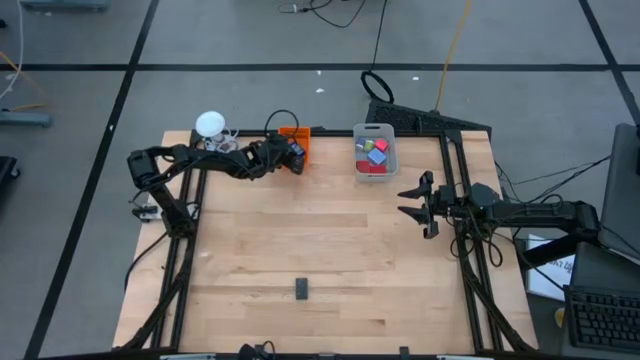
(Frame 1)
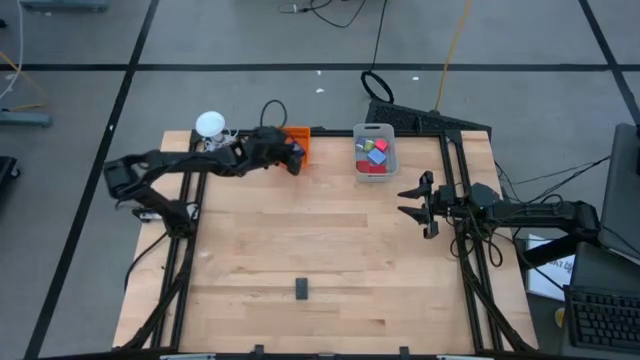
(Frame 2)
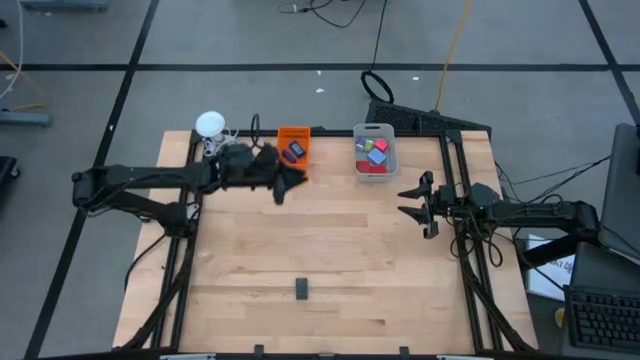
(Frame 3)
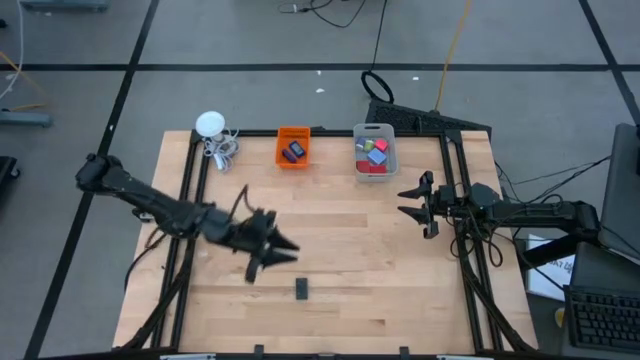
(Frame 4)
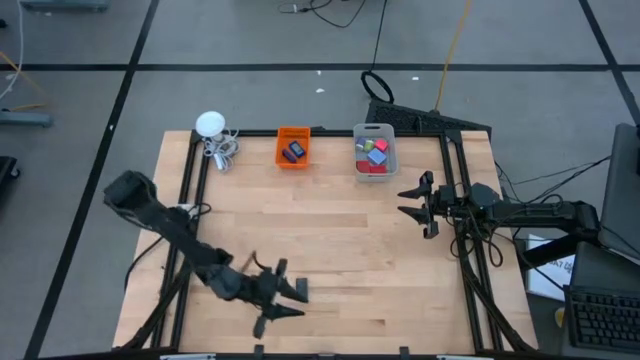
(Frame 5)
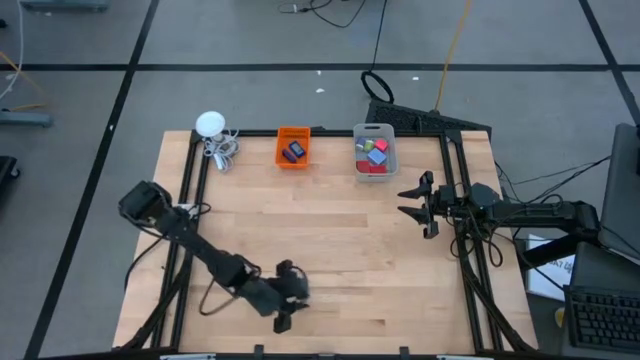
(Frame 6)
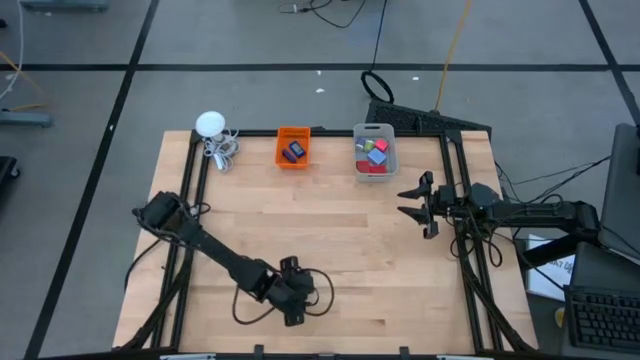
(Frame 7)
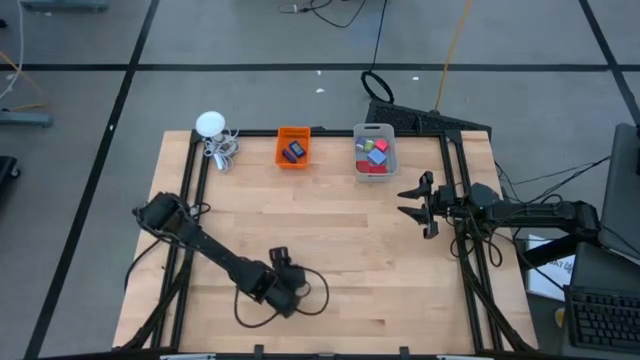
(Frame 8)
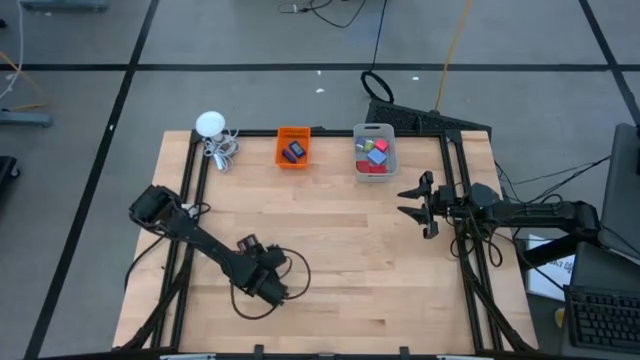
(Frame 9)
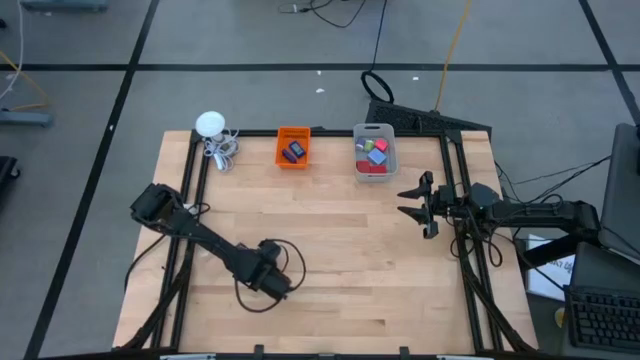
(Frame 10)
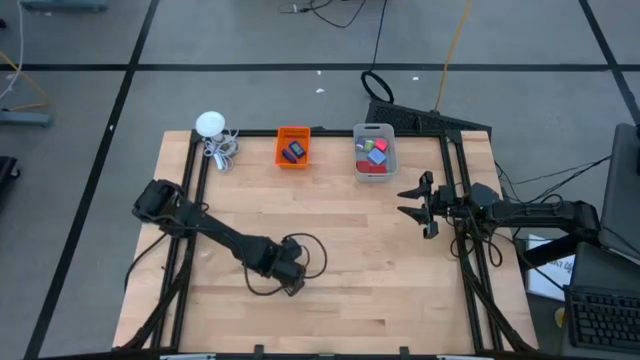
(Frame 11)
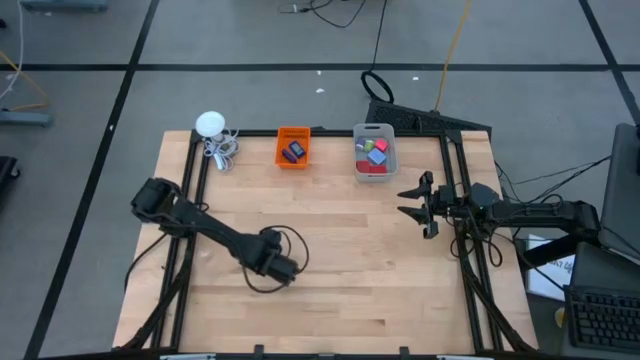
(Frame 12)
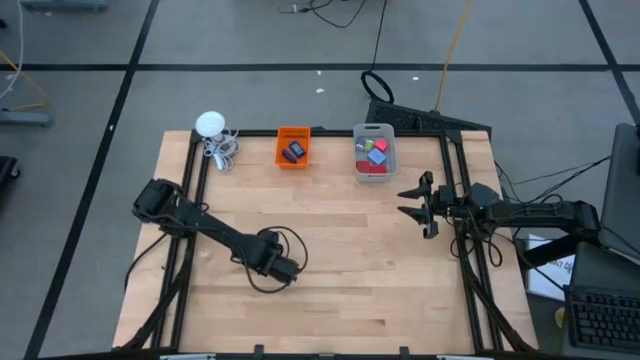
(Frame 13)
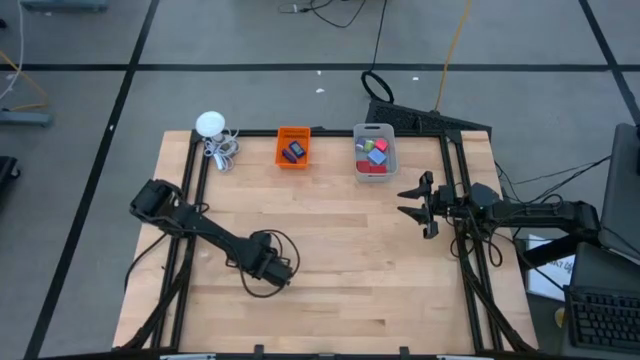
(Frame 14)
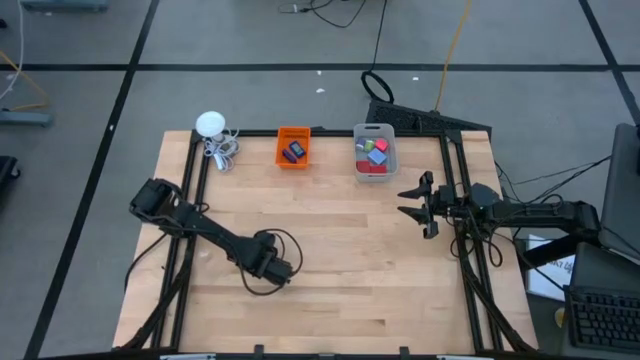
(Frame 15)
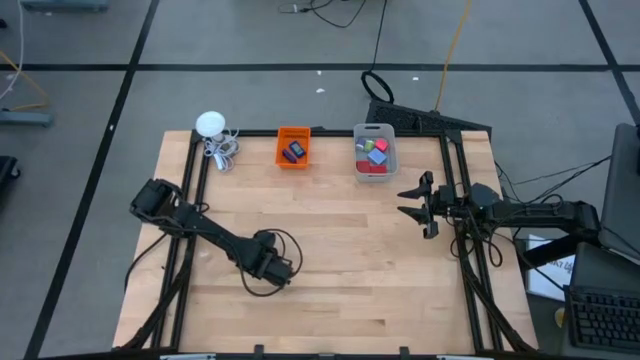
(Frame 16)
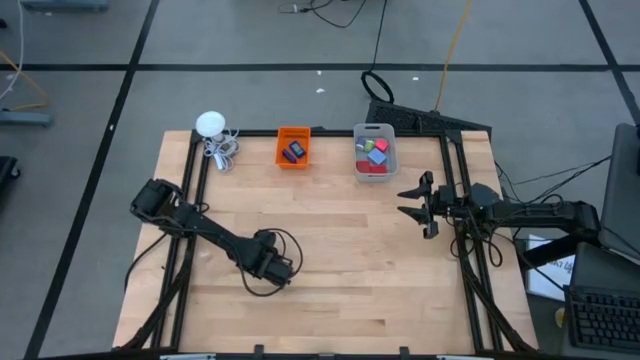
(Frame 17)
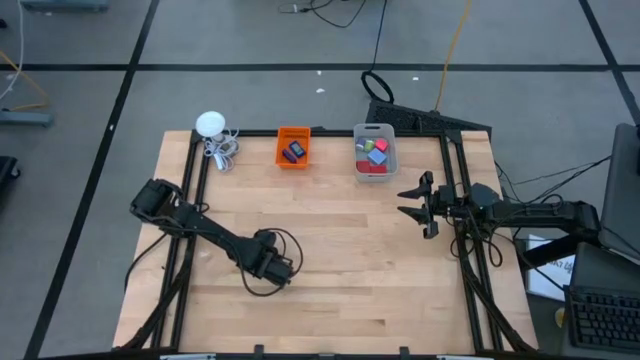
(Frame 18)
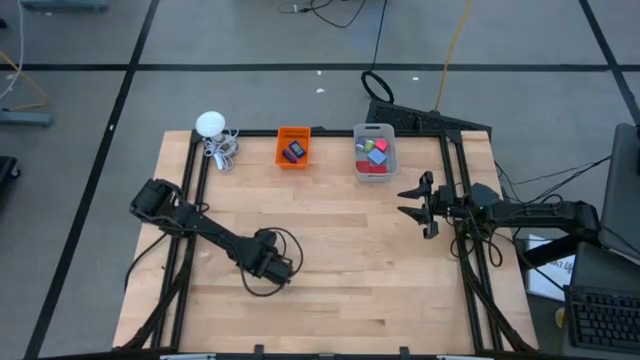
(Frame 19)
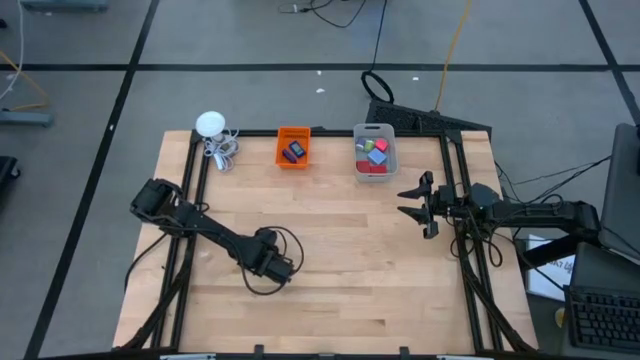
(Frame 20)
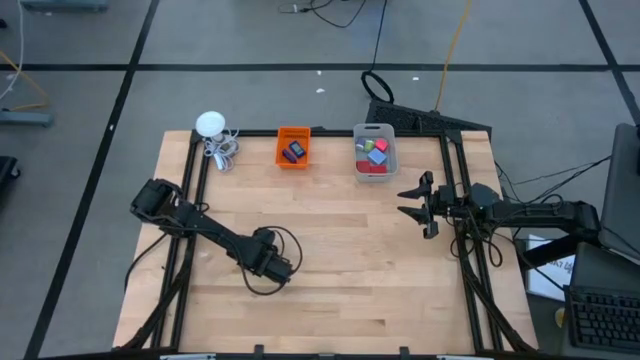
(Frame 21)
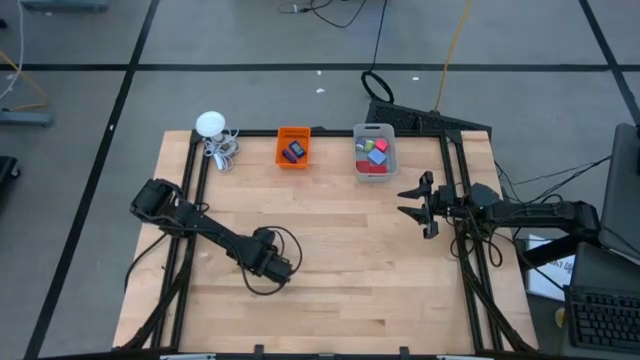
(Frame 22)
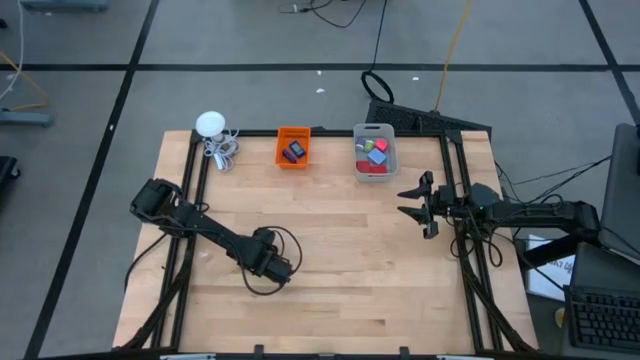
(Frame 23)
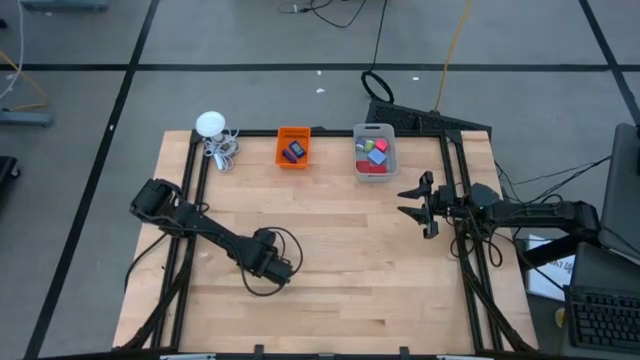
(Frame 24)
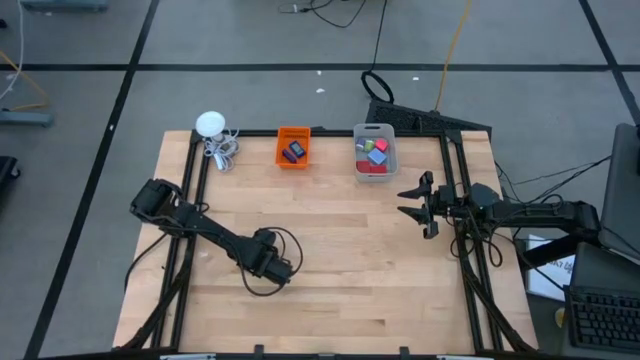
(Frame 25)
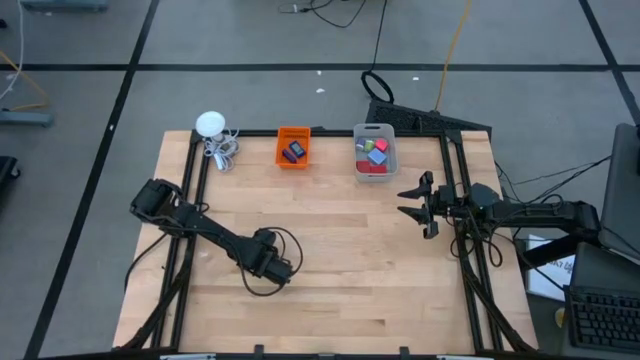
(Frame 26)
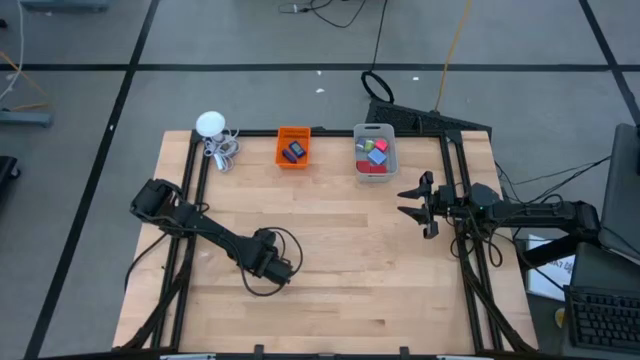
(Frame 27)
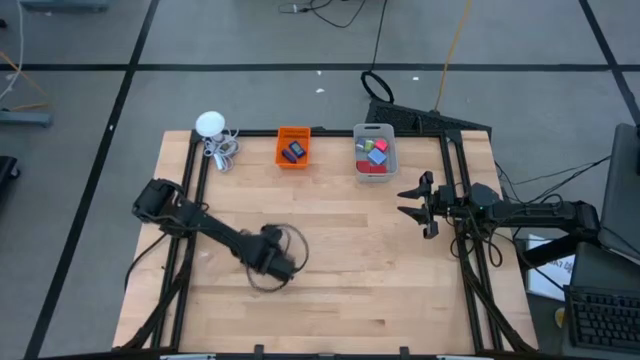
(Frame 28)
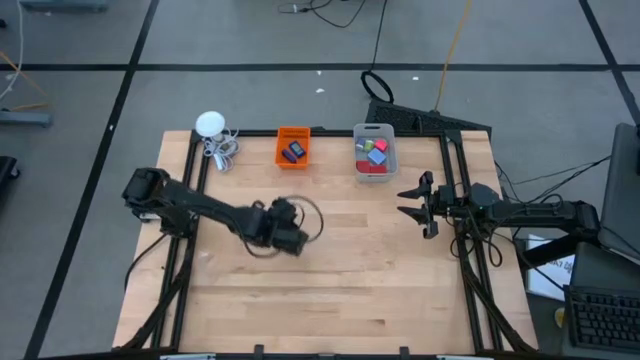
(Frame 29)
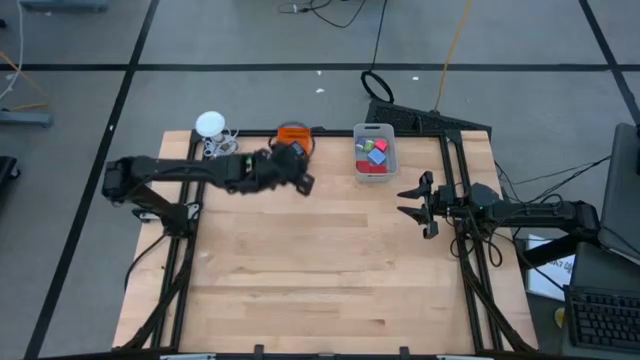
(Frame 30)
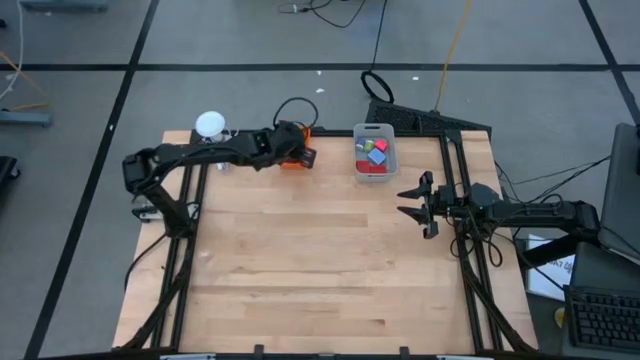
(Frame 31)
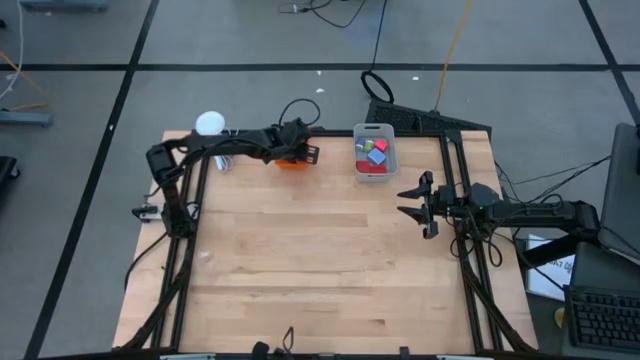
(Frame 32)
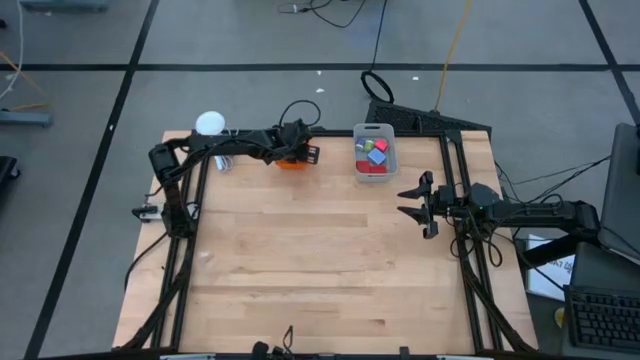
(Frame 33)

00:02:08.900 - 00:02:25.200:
Task: Pick & Place Office items
Put the black digital timer into the orange bin

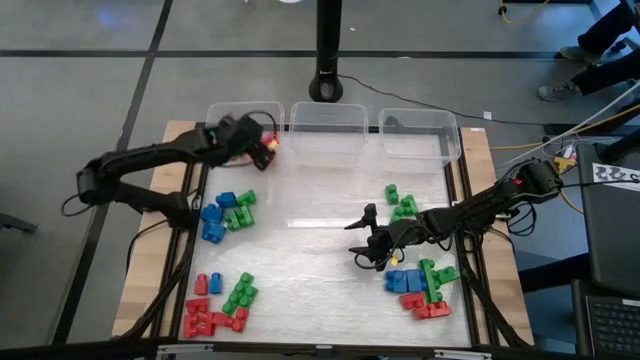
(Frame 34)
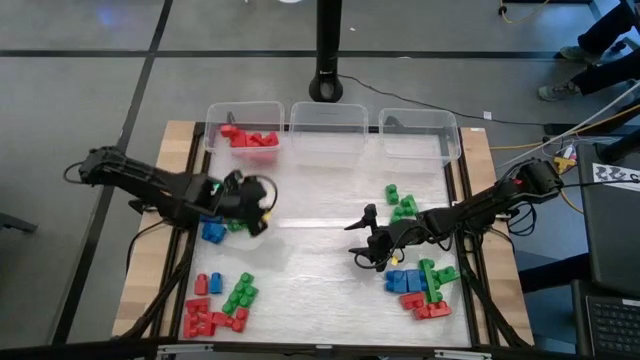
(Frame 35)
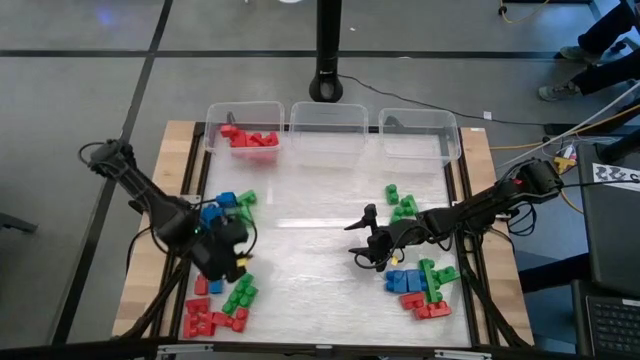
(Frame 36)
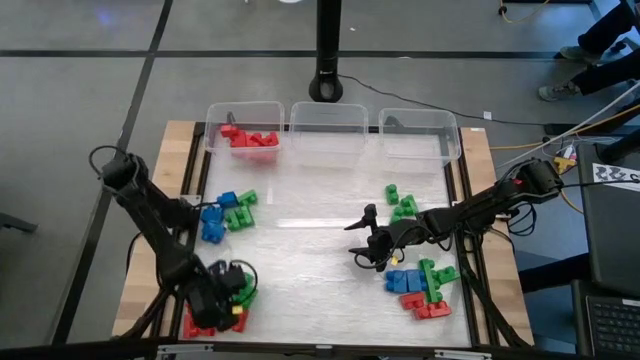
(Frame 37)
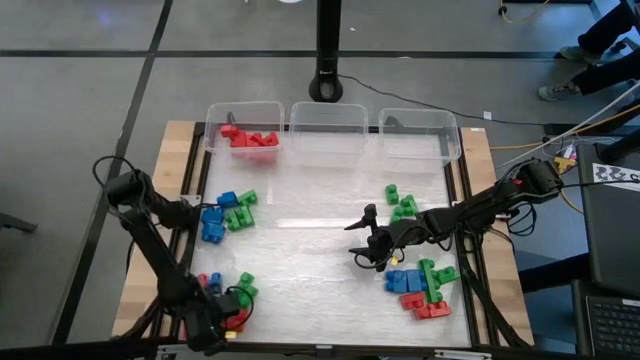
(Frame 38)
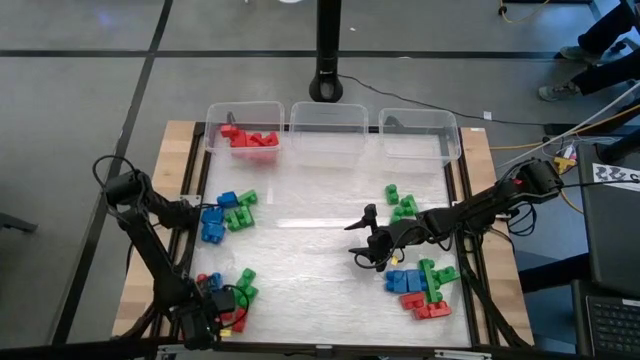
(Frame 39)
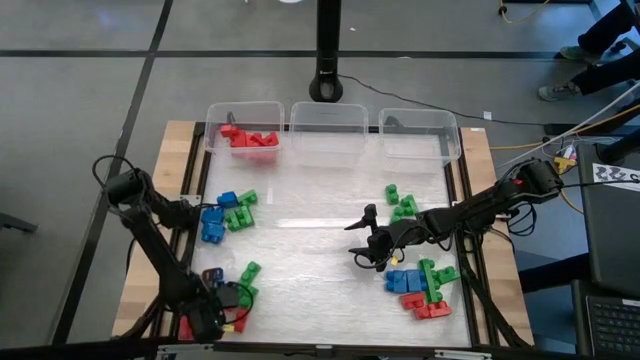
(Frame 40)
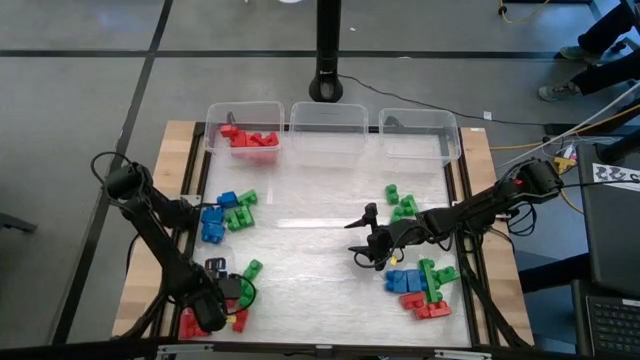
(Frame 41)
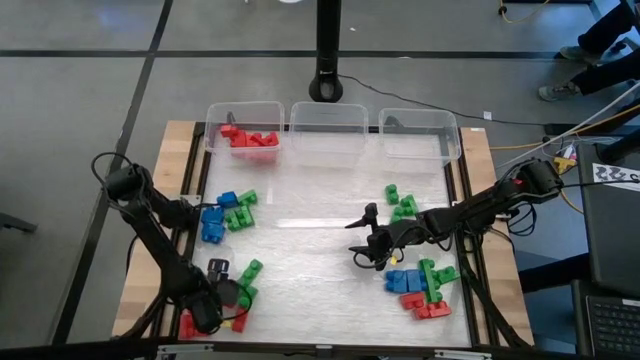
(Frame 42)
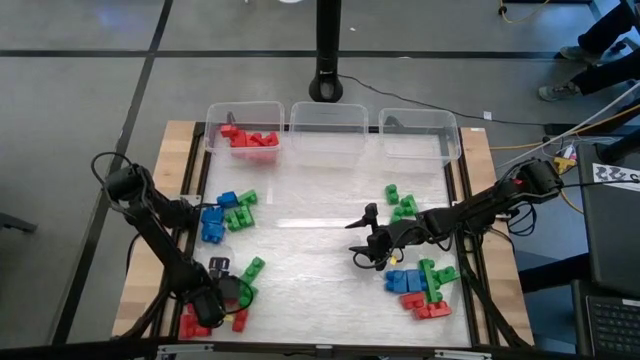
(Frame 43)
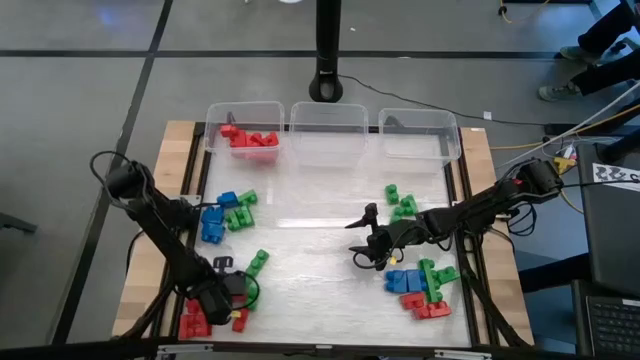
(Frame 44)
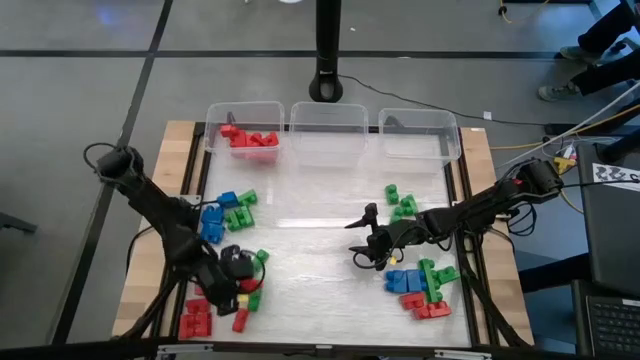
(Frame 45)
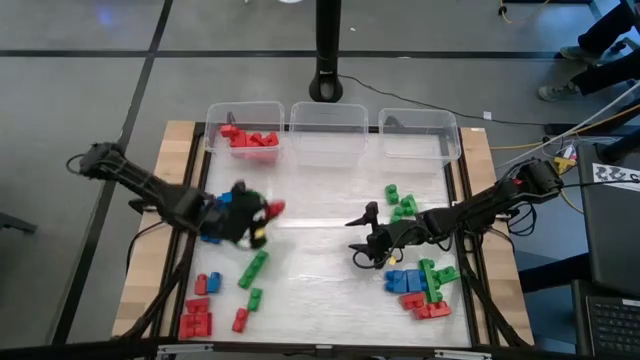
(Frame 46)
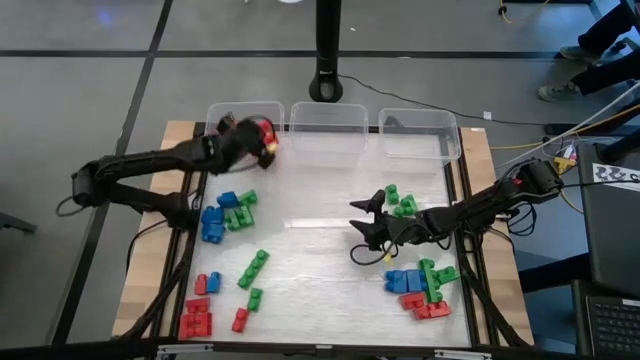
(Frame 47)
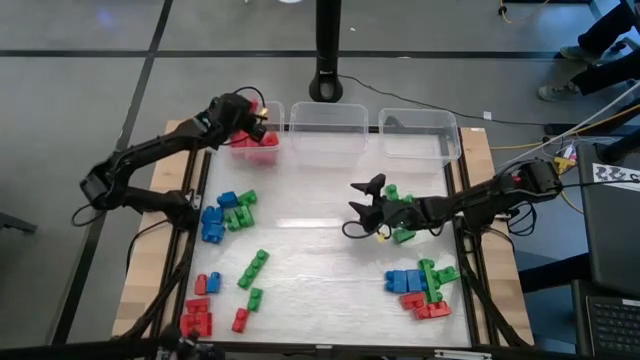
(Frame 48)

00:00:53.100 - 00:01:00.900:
Task: Sort blocks
Put the red game piece into the left transparent bin
